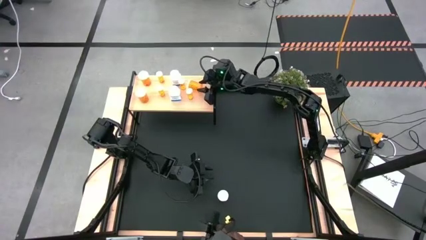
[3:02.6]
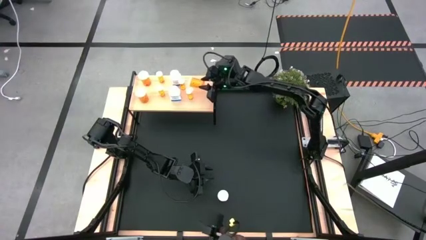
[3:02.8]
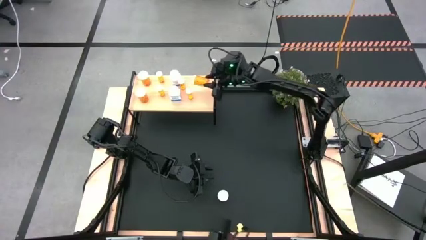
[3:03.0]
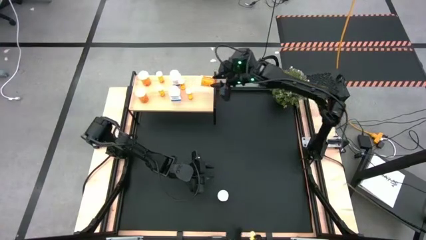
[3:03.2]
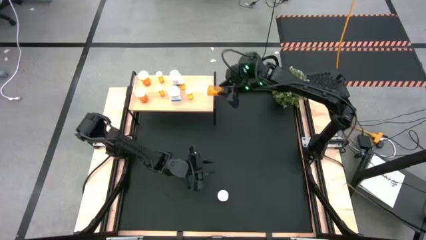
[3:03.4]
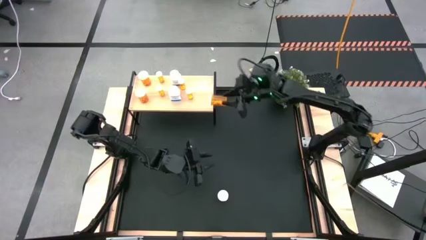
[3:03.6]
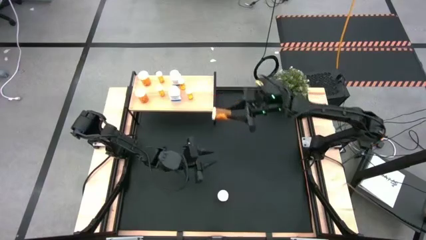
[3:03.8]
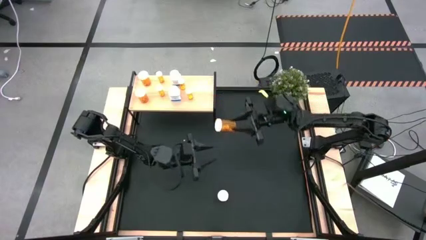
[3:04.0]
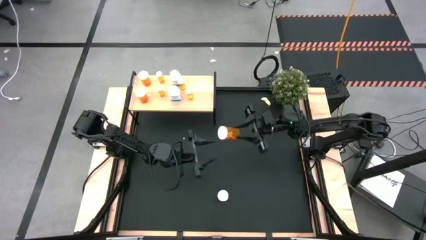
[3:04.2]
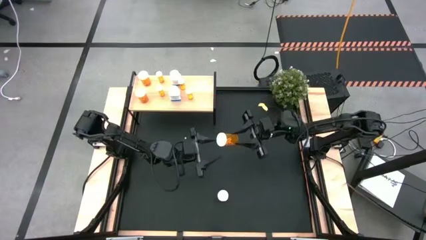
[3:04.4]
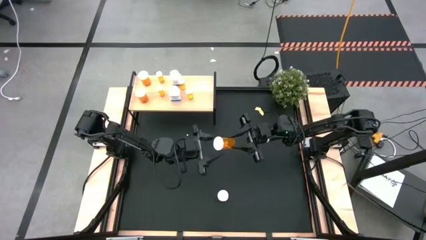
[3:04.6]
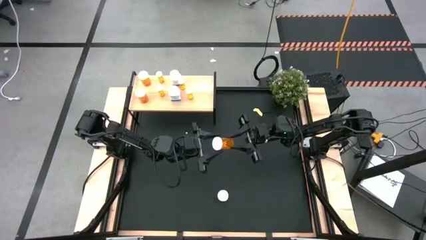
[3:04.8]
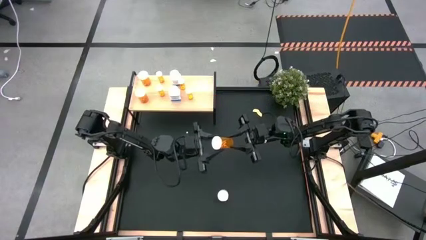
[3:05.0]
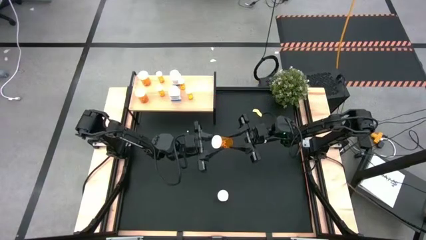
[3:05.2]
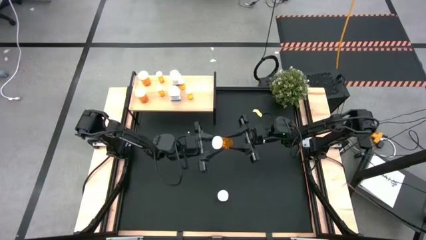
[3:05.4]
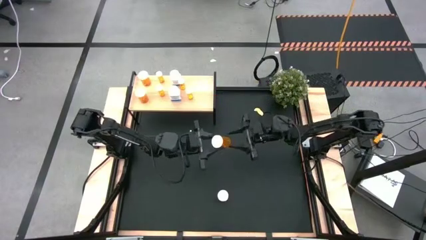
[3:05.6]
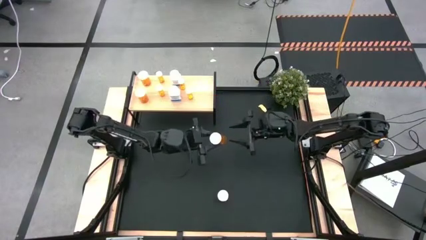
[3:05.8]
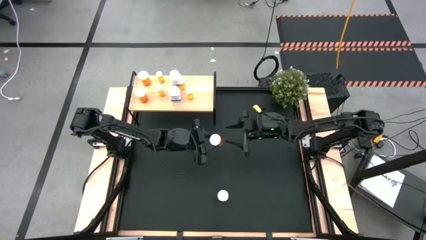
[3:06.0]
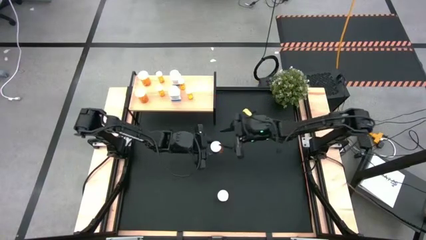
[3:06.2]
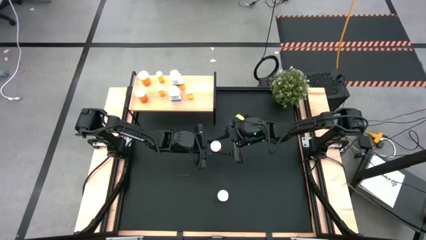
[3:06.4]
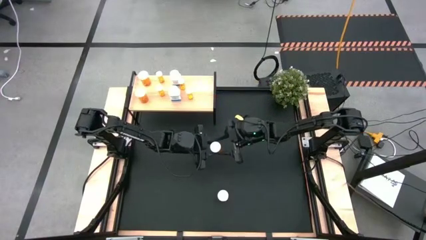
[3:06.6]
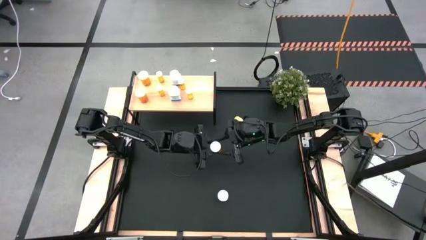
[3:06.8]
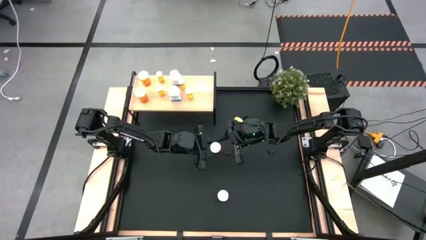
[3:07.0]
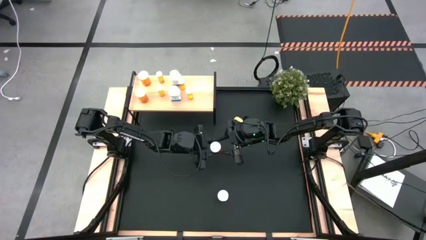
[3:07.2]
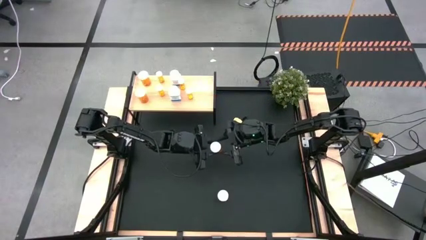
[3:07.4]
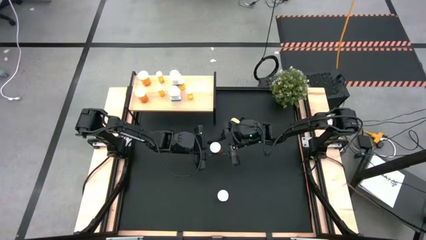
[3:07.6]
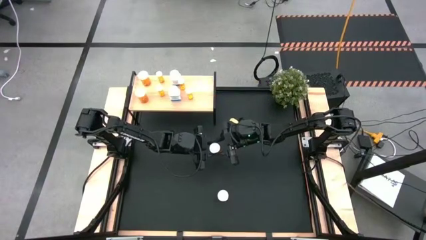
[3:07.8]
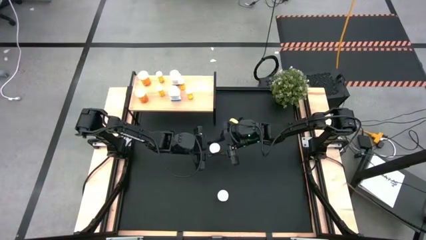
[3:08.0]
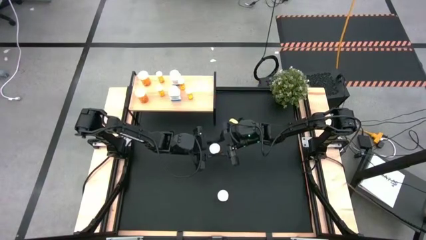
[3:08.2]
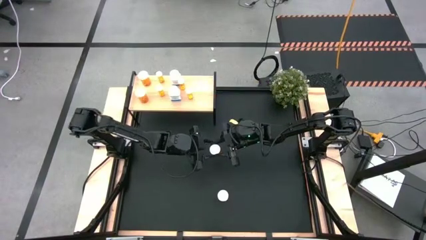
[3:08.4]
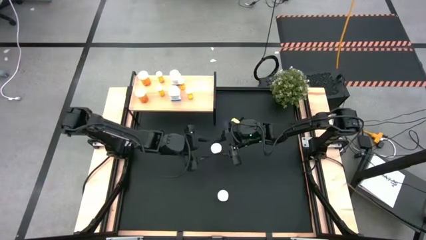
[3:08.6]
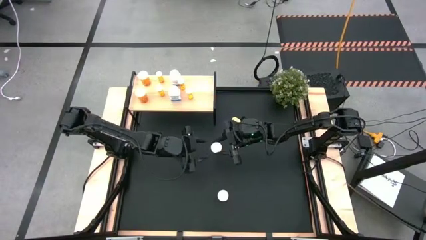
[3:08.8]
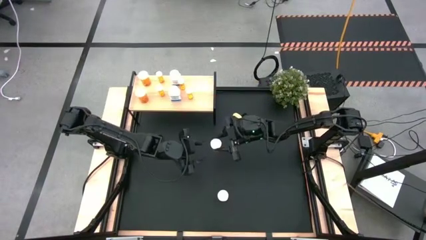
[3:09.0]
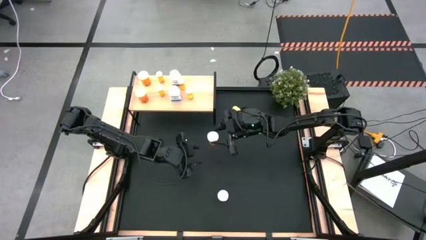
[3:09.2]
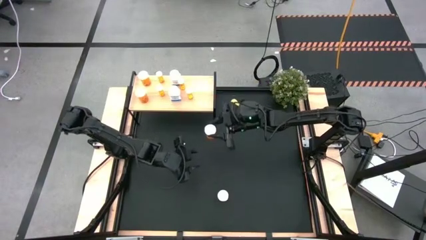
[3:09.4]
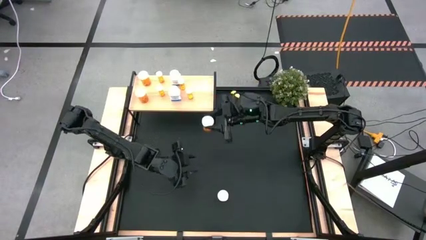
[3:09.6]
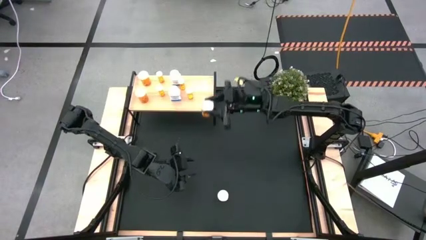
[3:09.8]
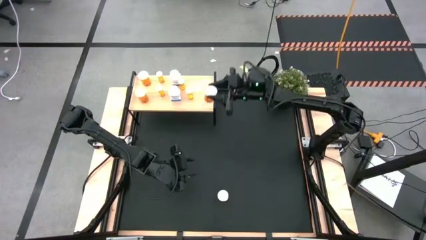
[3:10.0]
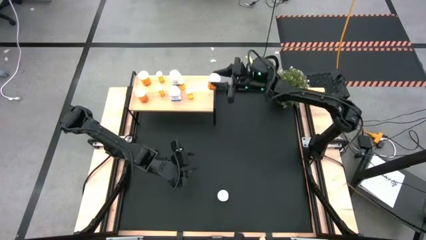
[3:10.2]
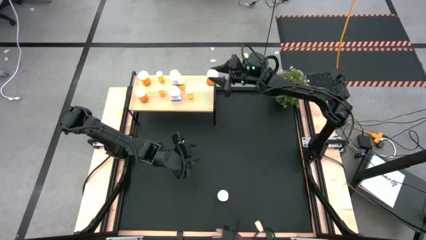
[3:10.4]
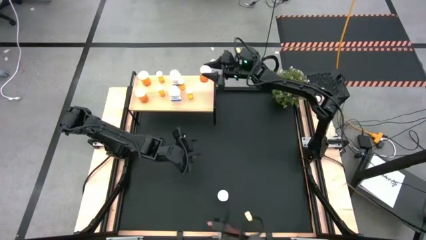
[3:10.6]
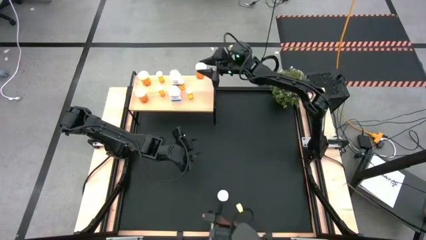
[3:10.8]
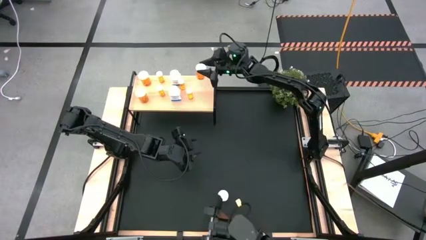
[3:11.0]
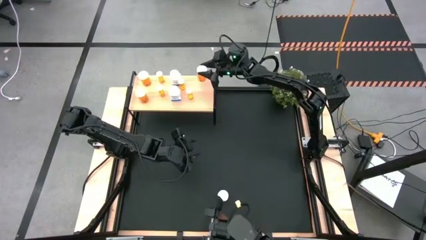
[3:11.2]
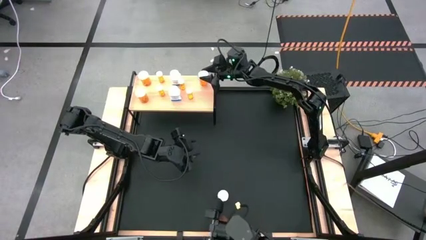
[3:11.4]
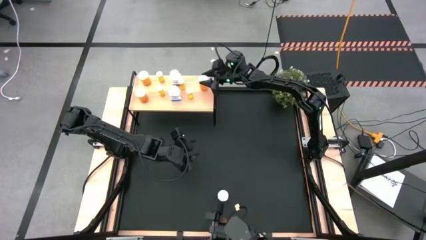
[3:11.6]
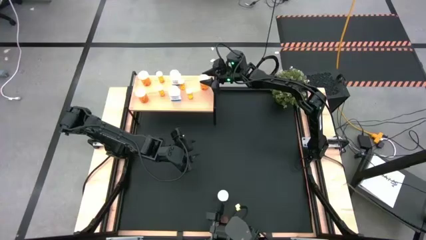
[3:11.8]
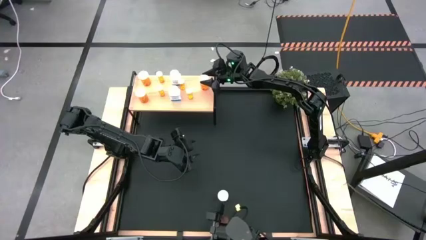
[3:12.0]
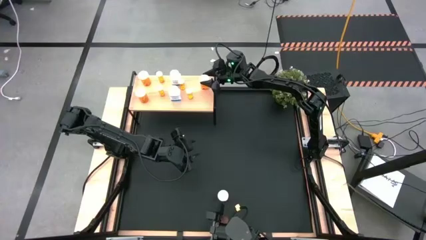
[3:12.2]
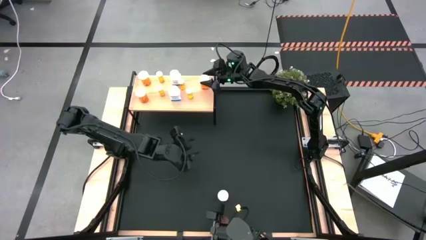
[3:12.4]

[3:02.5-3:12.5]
Task: Pick and place medicine bottles onto shelf by color
Put the large orange pill bottle on the shelf
